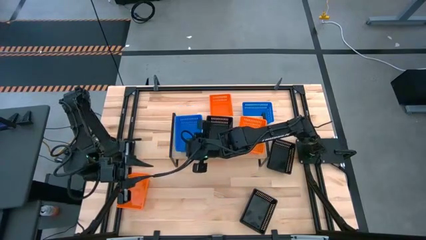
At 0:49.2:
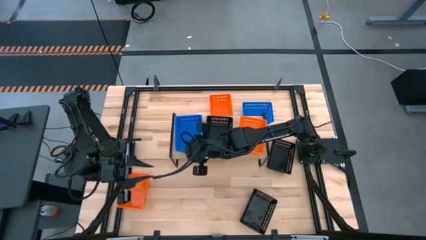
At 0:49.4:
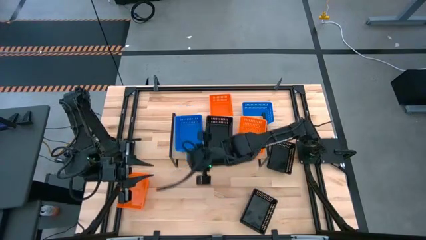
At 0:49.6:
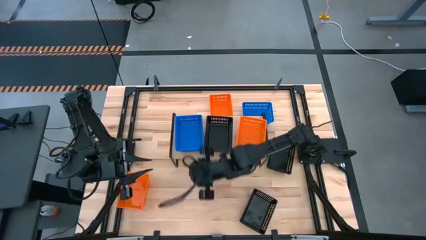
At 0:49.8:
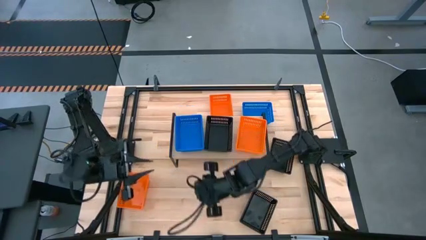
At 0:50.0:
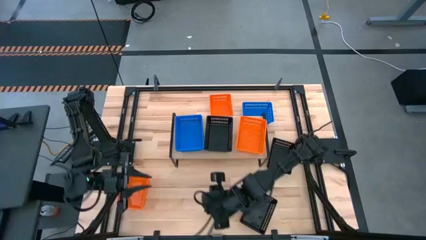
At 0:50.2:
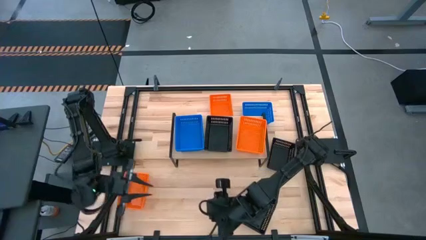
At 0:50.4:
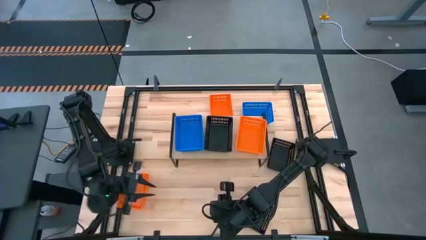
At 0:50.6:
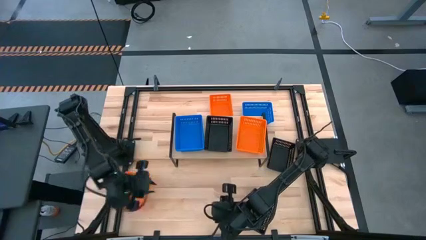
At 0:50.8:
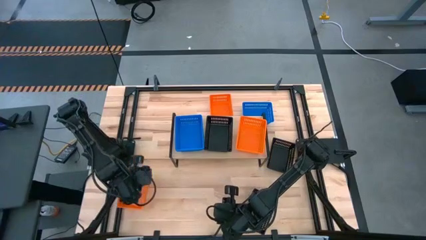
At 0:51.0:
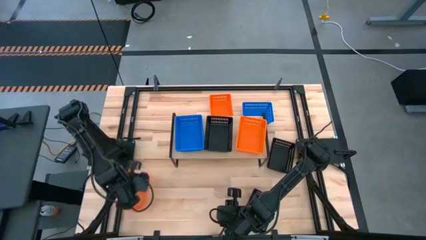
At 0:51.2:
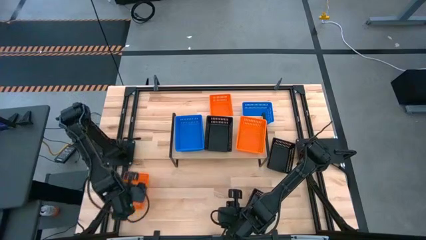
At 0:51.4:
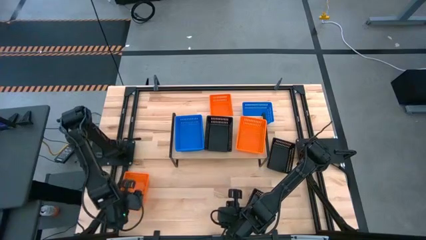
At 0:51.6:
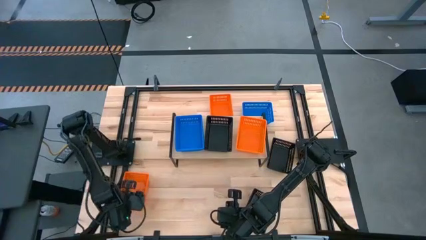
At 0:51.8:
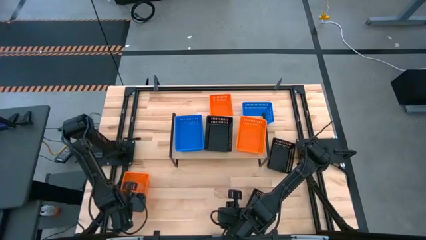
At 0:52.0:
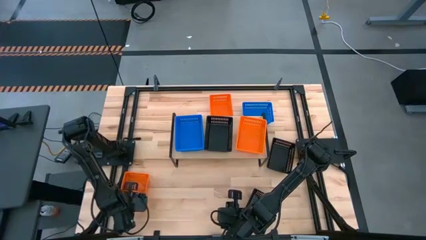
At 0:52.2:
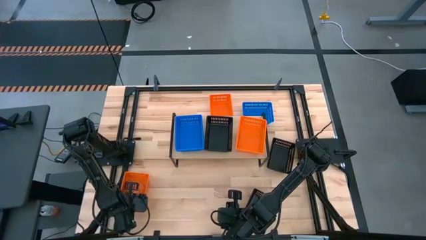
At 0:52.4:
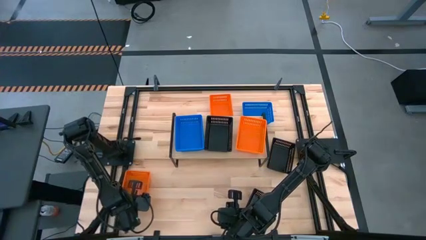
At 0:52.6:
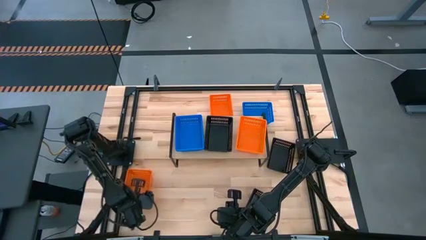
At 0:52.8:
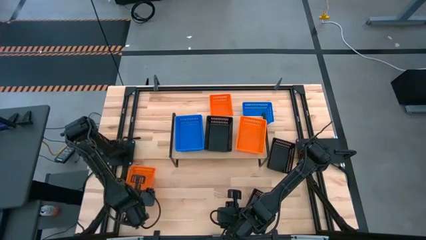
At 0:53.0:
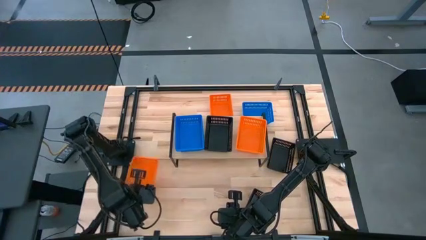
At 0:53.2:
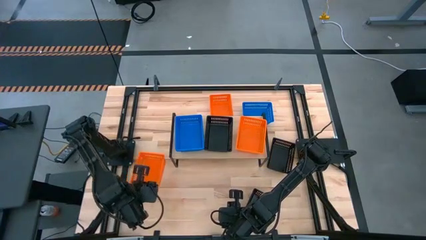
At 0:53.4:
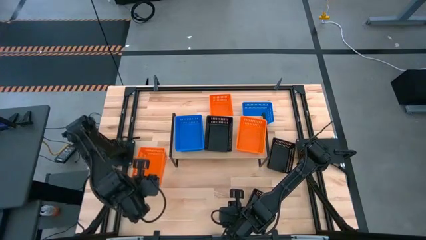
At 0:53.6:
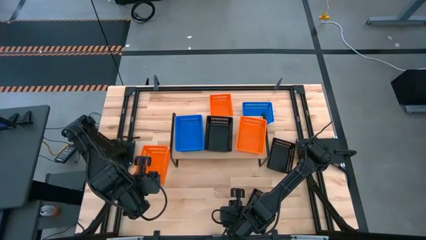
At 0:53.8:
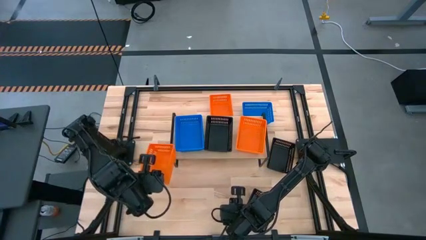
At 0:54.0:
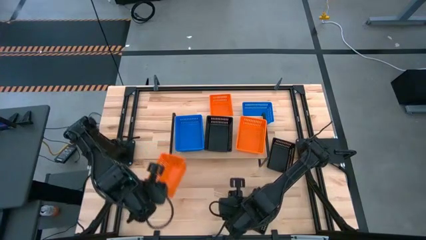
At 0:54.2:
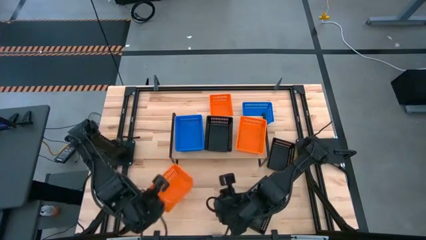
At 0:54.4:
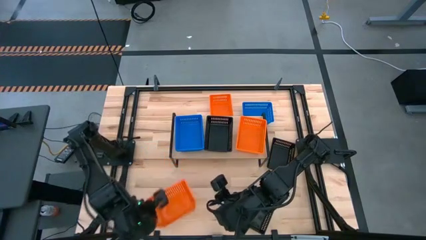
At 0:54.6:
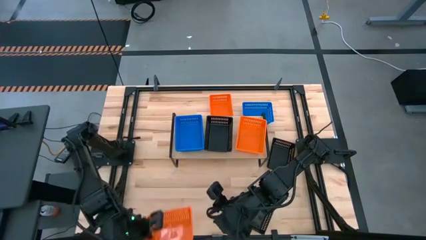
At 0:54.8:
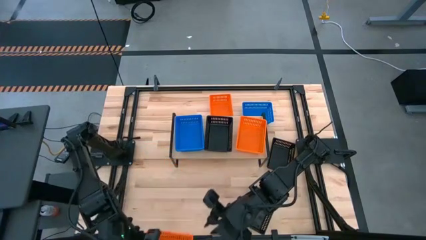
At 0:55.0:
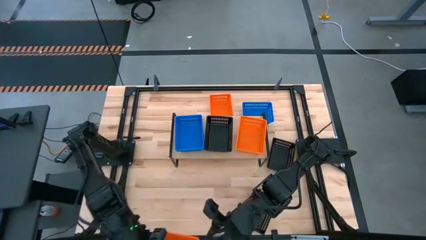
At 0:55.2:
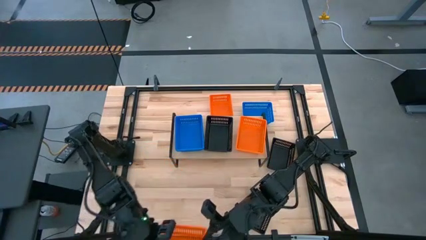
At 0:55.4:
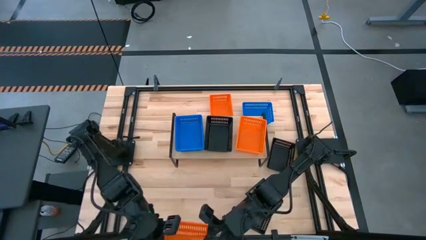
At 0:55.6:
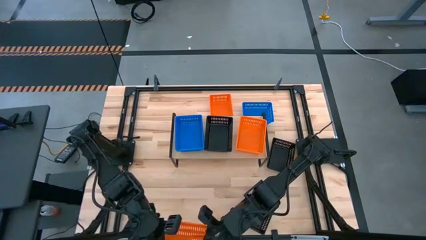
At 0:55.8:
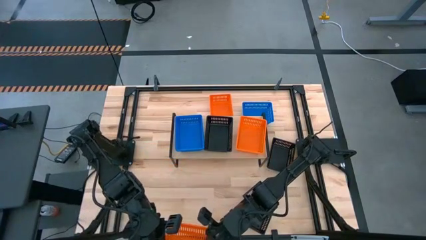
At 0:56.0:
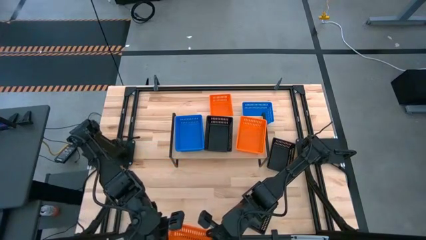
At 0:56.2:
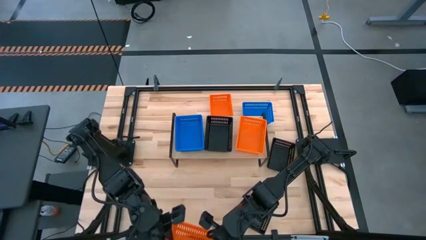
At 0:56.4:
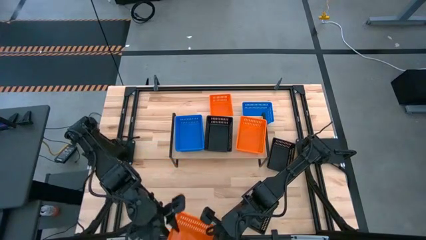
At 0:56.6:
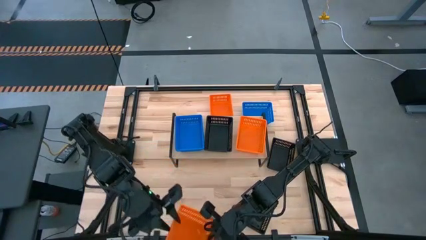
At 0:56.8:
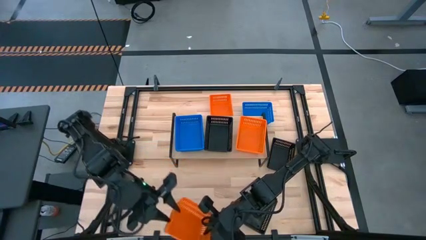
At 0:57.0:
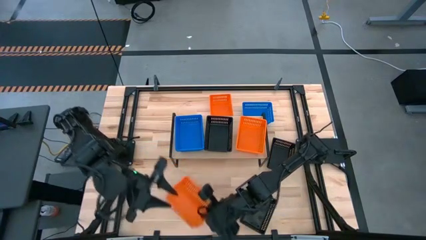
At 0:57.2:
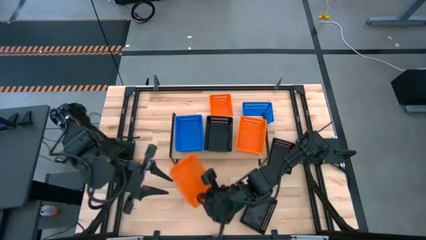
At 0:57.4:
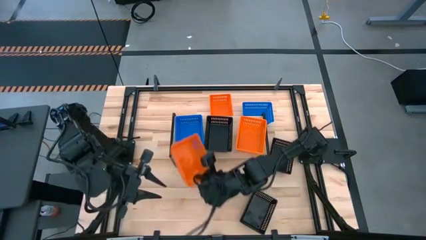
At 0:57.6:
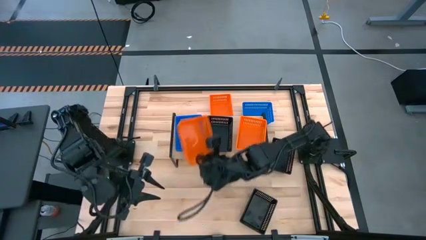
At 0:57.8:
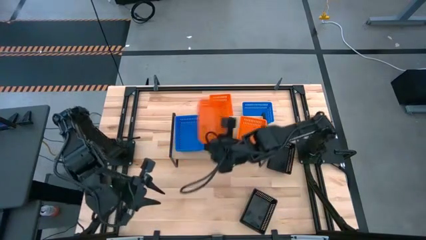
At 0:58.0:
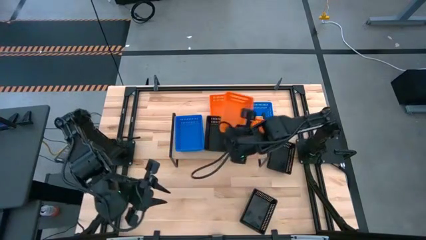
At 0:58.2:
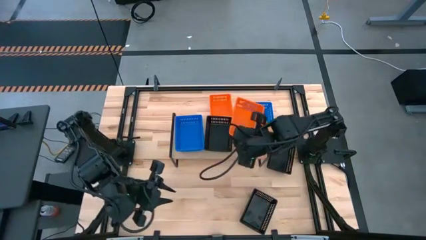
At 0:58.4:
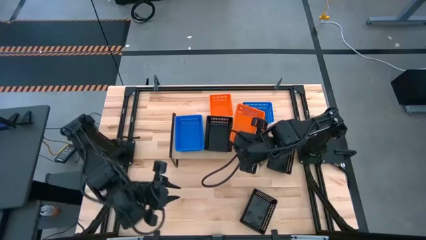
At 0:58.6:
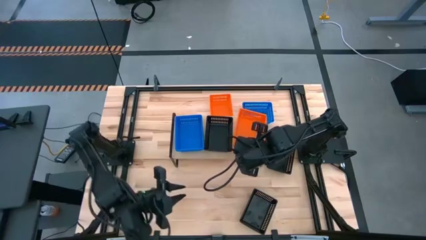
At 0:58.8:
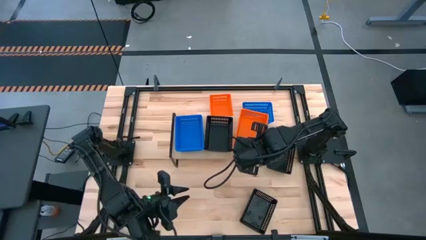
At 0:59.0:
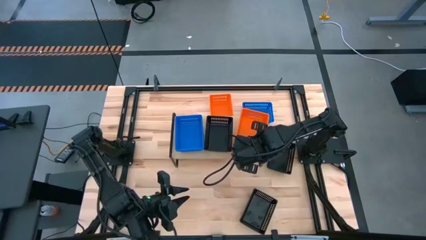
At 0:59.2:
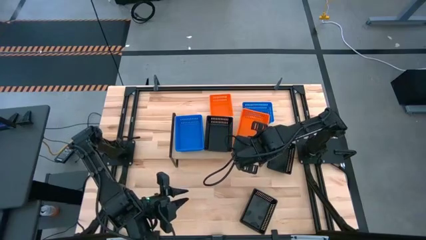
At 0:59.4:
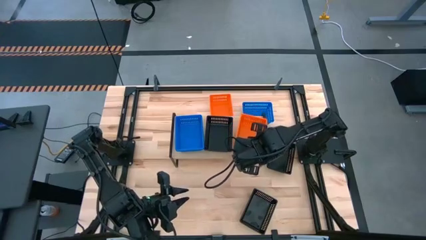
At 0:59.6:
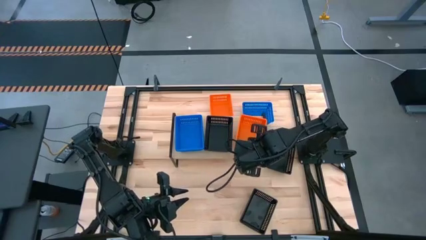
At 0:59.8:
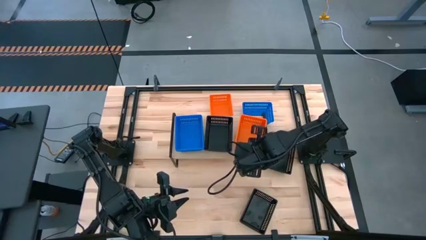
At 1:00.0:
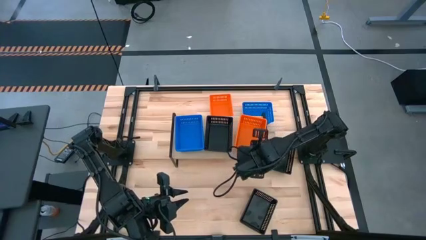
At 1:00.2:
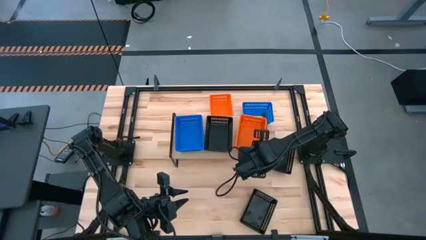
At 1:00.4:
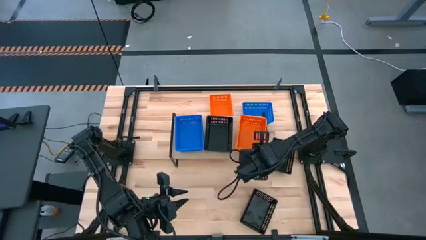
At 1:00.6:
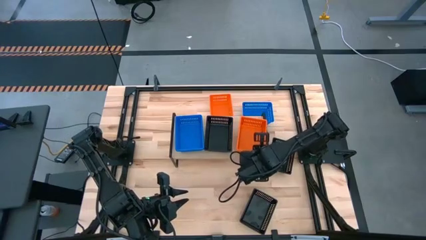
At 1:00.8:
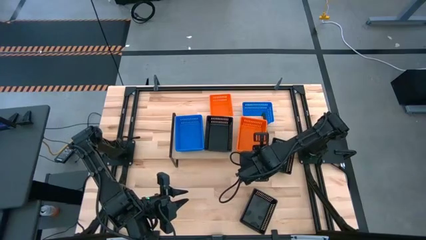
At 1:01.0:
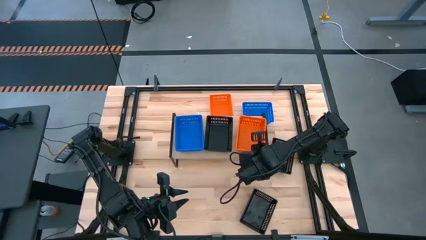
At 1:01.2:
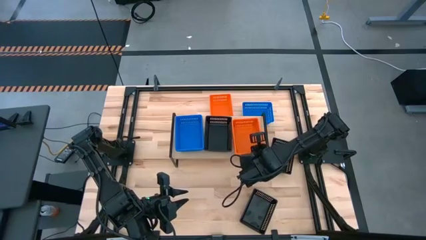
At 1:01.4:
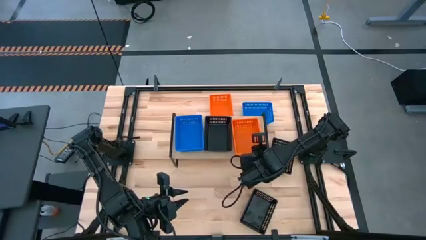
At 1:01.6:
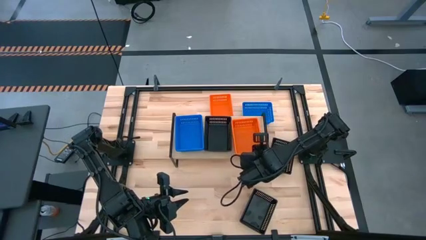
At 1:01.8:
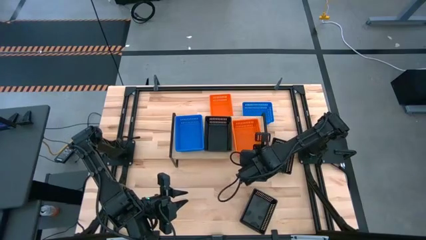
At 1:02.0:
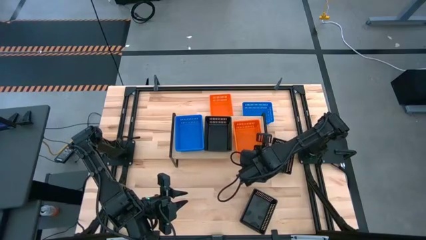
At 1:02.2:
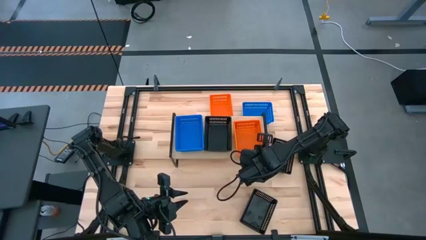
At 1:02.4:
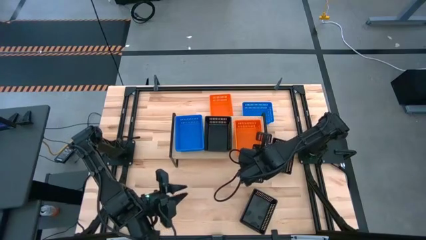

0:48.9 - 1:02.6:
Task: Stack baskets on shelf by color
Stack the bottom orange basket on the orange basket on the shelf

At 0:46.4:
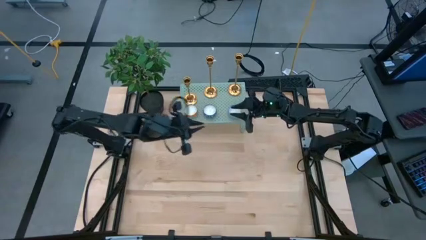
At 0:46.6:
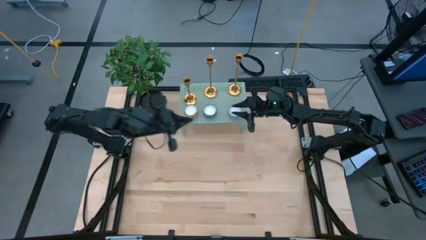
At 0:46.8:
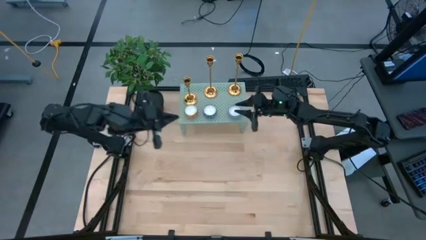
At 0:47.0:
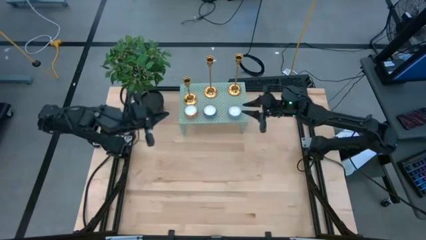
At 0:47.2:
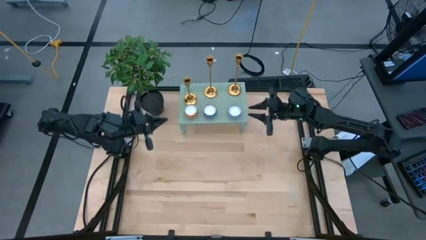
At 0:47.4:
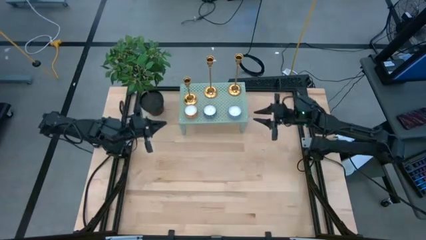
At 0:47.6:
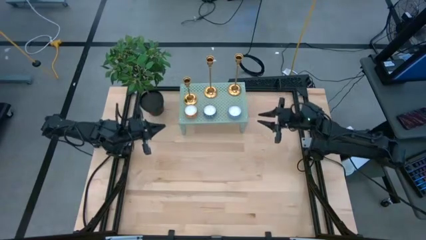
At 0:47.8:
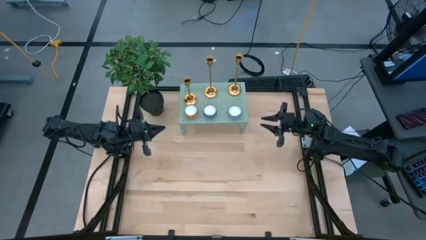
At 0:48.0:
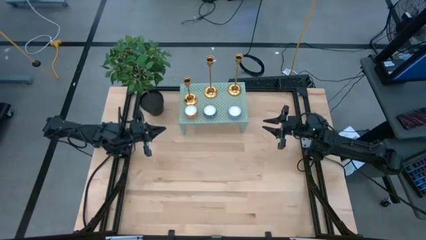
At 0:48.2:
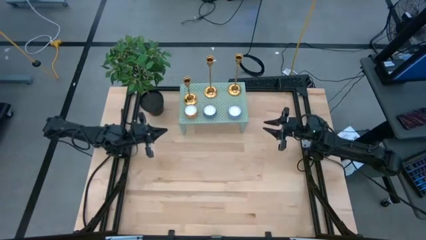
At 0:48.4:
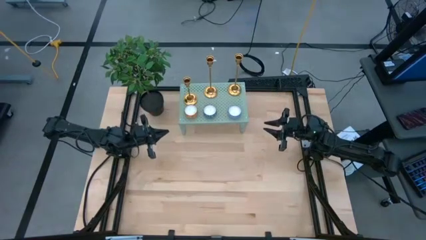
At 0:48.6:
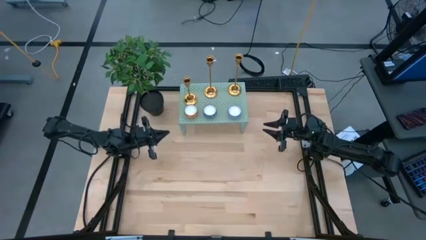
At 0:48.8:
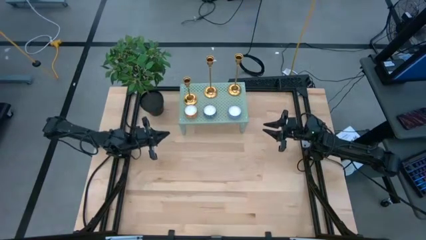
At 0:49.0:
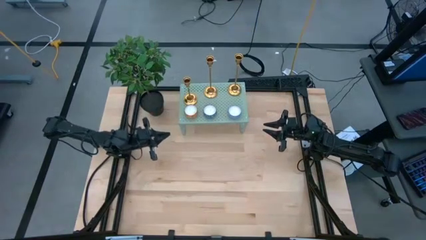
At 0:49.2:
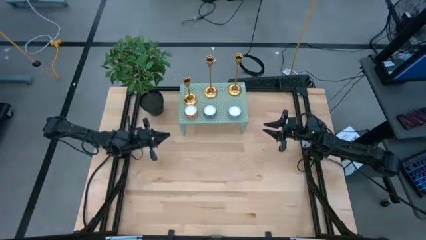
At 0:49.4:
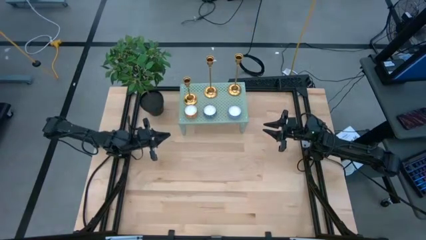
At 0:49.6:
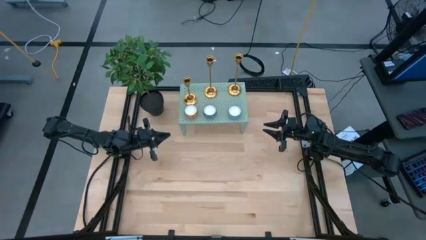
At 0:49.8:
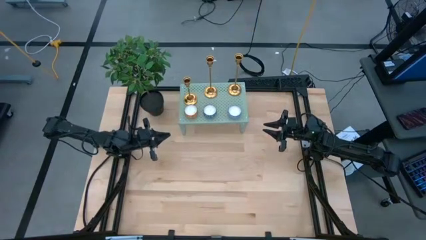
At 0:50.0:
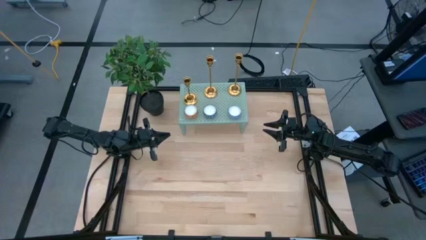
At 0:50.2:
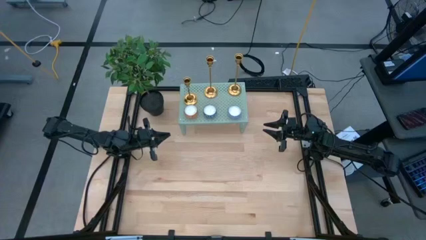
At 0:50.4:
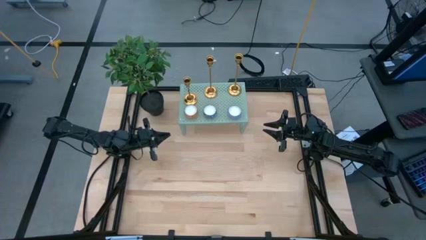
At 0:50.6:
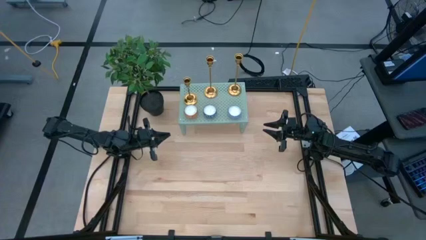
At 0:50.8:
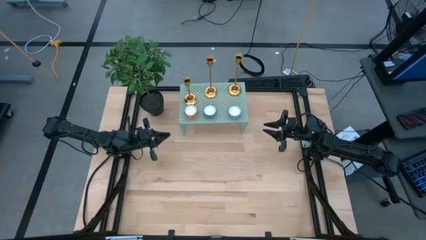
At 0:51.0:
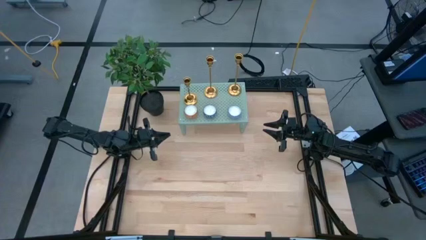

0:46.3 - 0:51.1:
Task: Pick & Place candle stick holders
Return to Home Position
